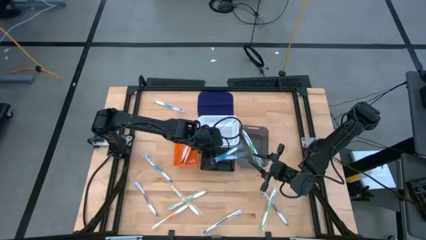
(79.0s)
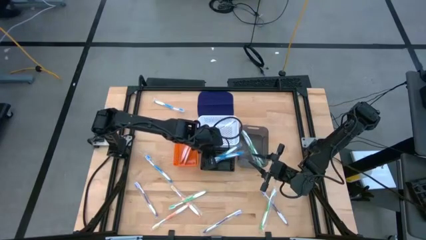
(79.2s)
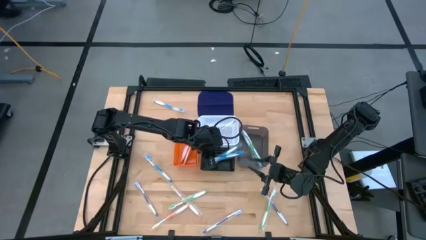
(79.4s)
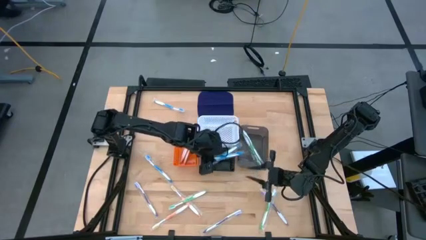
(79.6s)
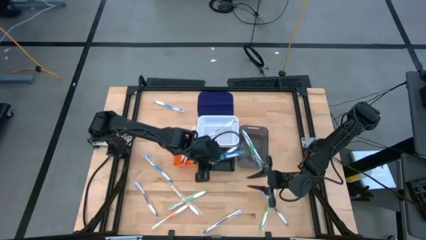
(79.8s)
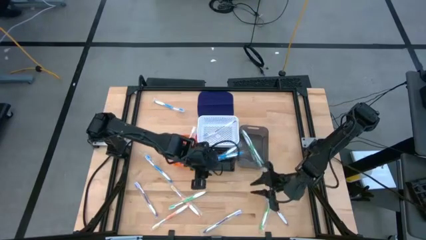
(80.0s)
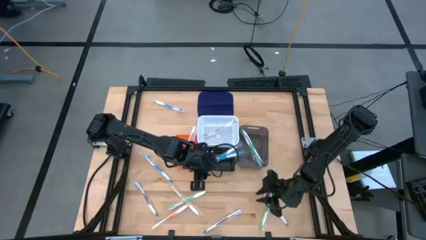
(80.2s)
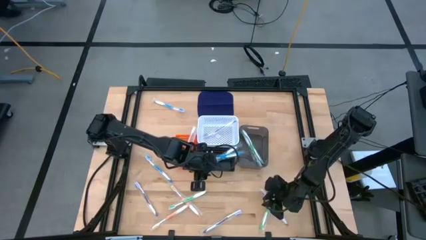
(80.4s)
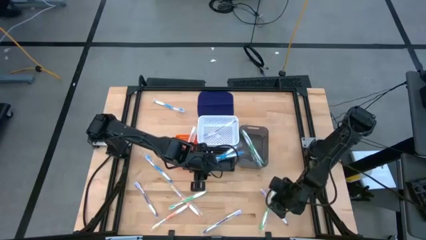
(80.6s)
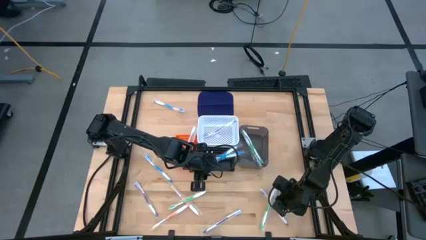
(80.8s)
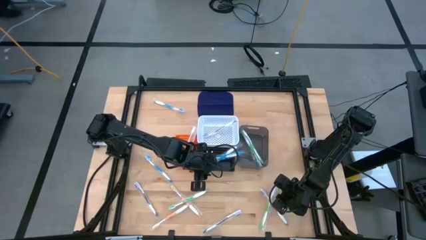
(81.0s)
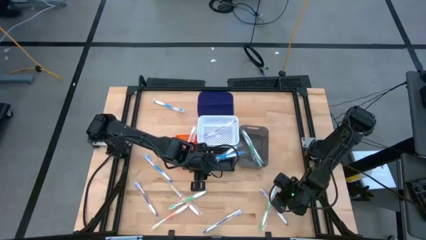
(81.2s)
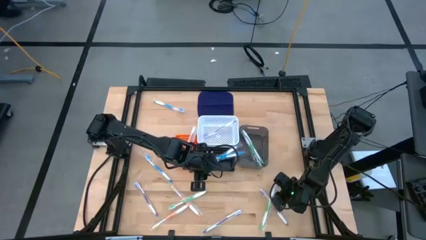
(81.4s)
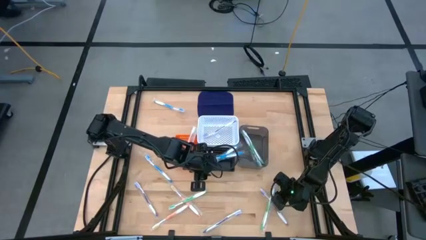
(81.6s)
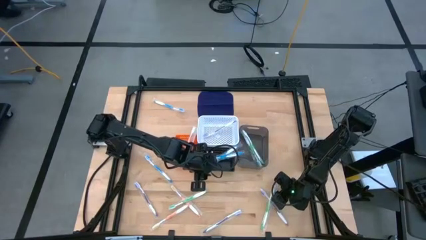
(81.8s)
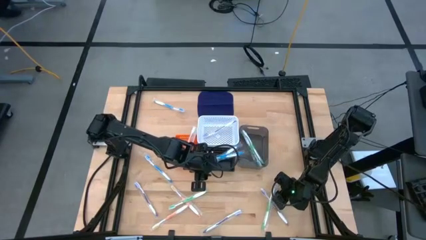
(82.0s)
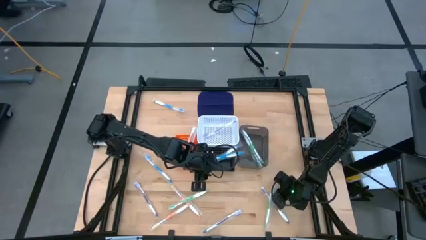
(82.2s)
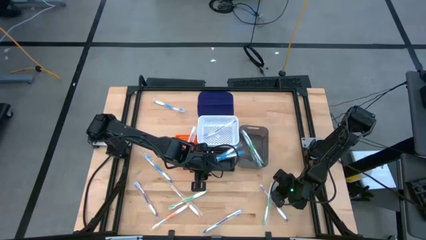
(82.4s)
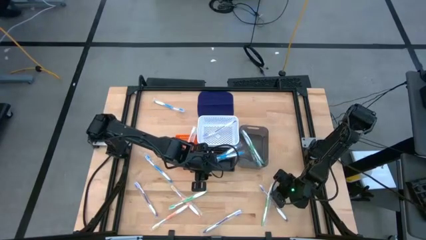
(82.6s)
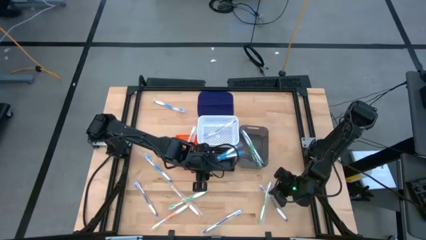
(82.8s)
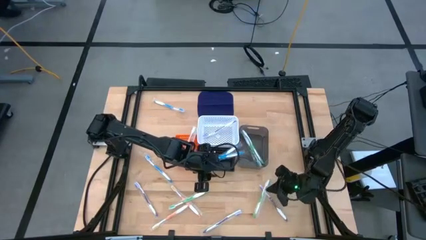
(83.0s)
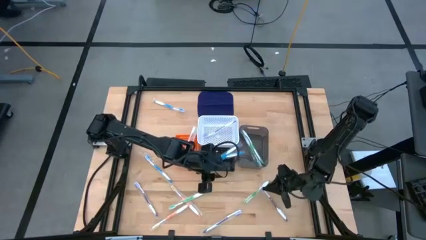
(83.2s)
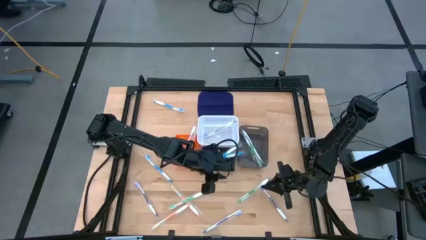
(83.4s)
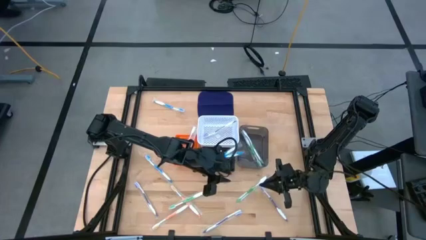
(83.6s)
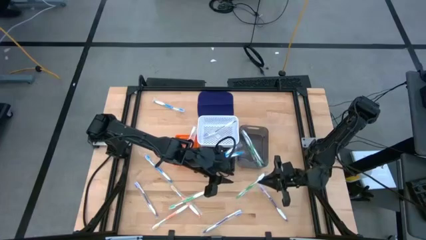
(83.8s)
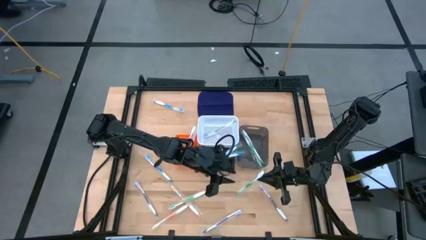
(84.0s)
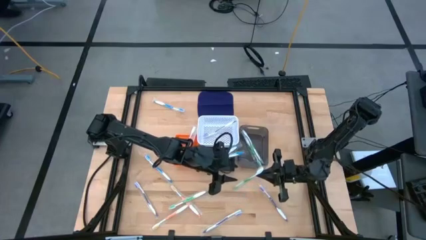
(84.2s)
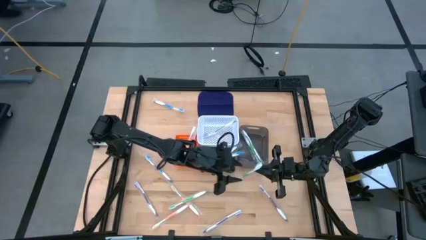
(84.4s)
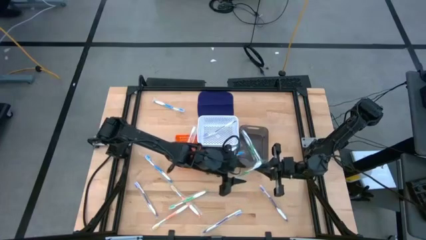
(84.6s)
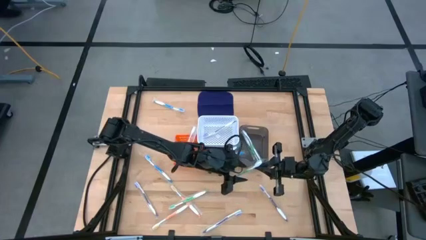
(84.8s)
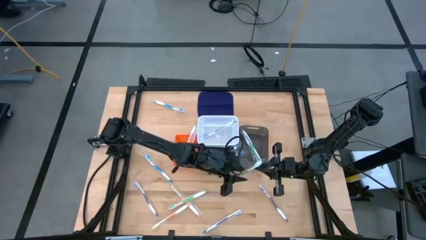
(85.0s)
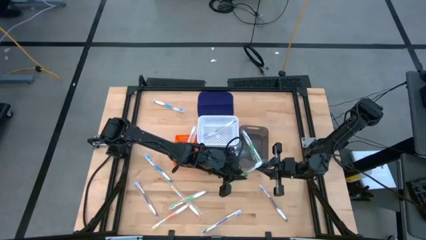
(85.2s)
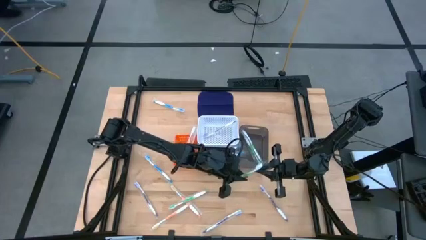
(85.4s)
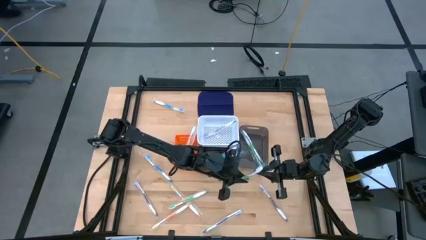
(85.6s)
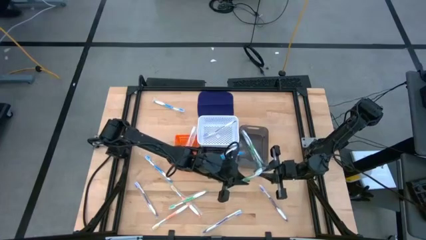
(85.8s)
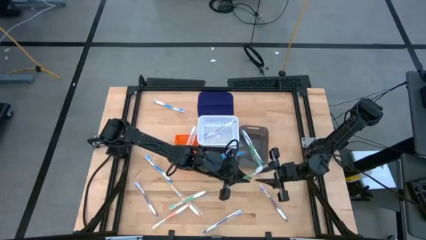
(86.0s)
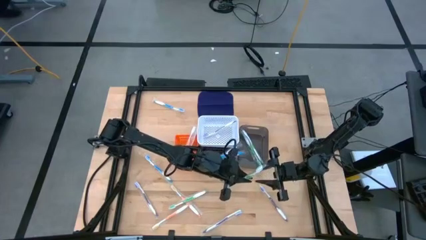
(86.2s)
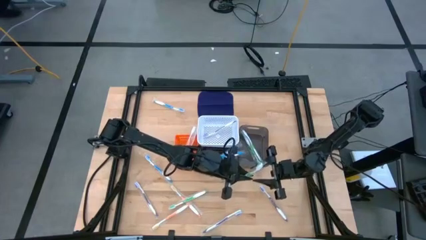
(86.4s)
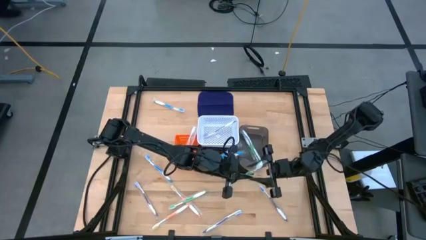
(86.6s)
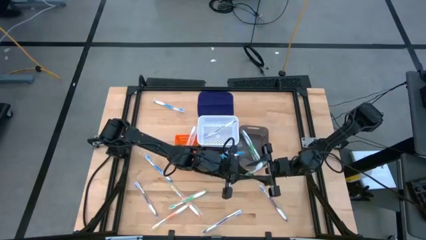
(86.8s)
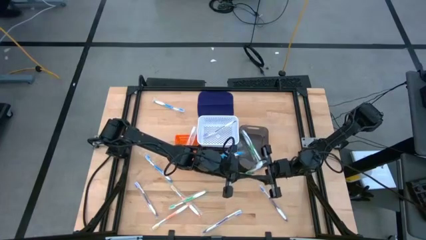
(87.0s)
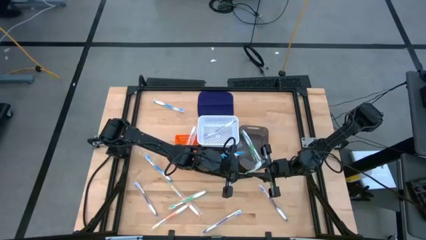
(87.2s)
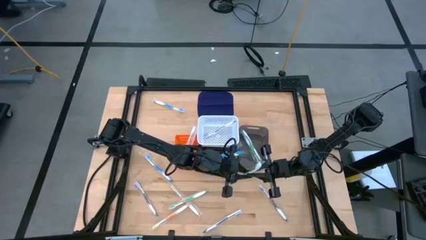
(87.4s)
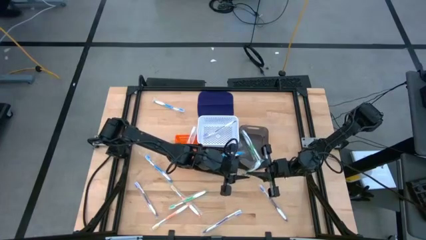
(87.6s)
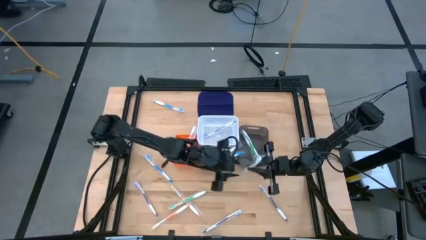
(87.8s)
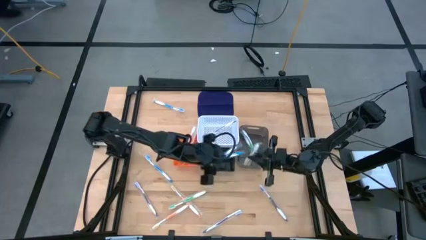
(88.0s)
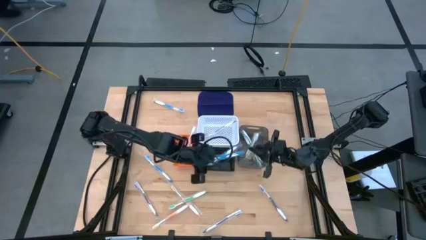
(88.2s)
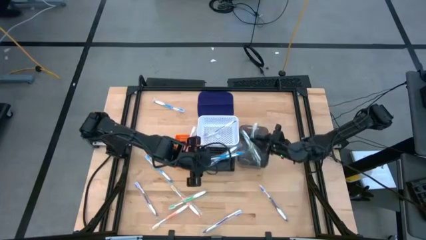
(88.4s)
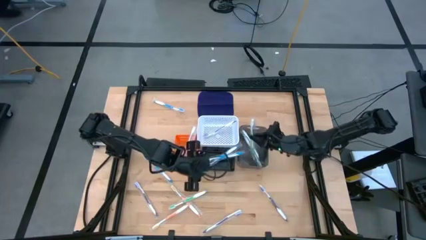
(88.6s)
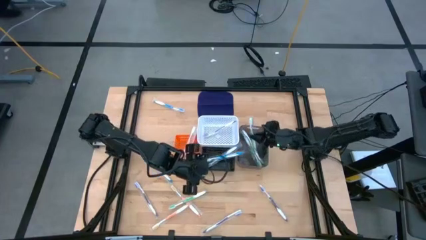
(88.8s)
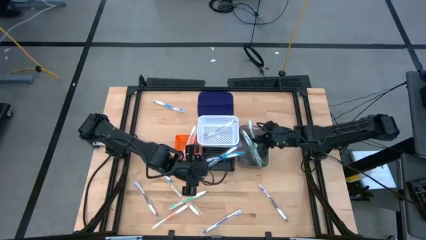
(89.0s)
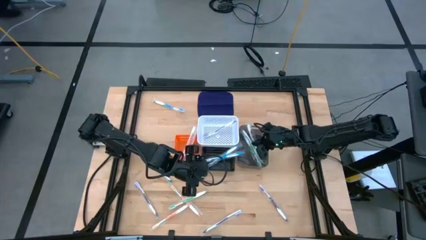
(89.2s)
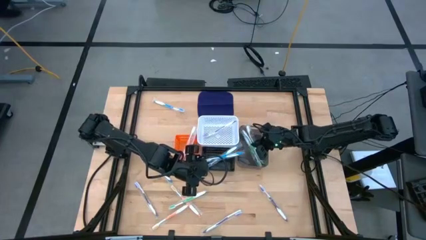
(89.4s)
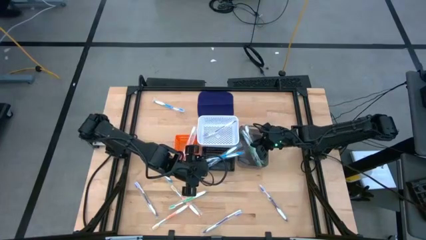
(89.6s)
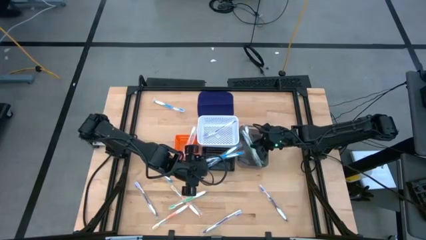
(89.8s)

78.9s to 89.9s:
Task: Pick & Place Toothbrushes
Put the green toothbrush into the black bin

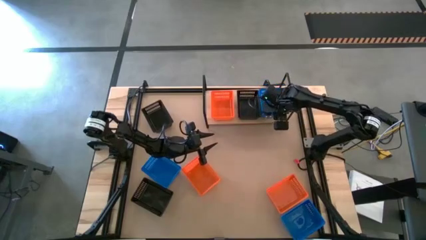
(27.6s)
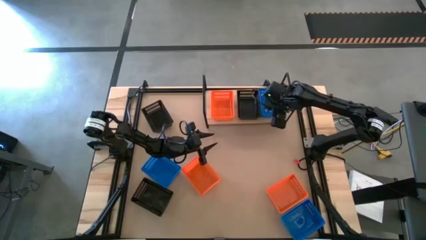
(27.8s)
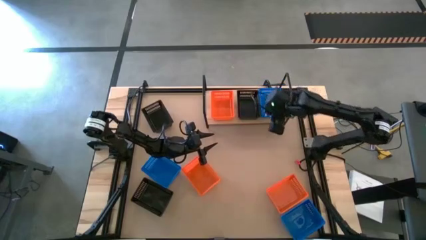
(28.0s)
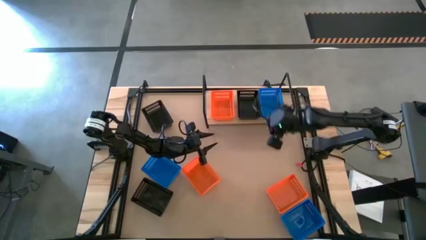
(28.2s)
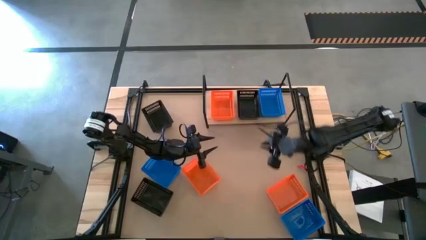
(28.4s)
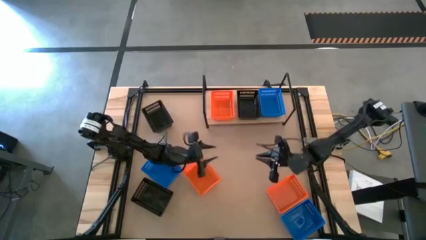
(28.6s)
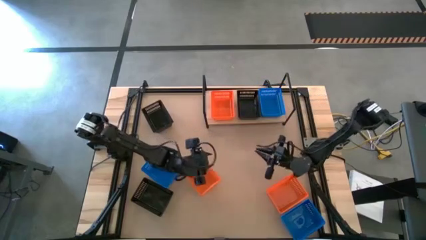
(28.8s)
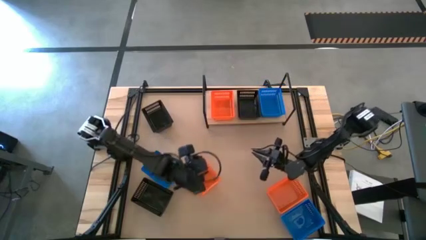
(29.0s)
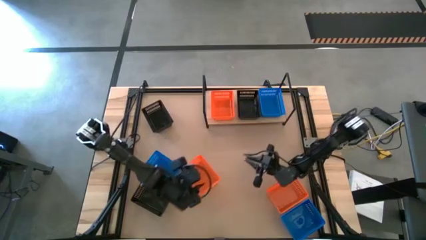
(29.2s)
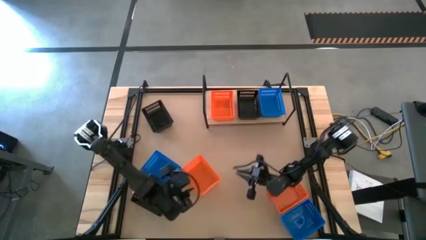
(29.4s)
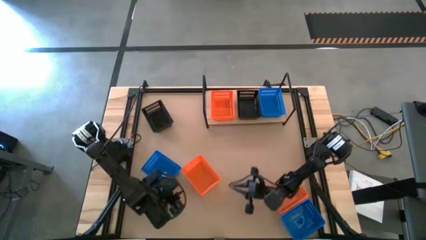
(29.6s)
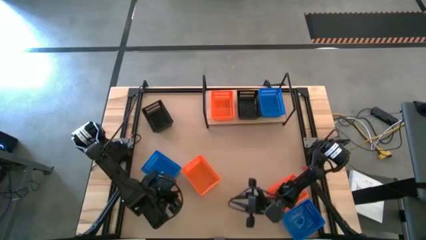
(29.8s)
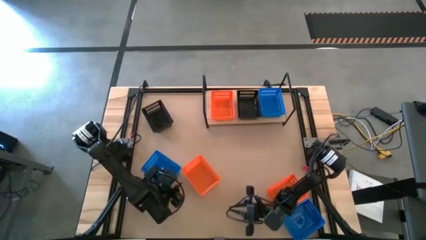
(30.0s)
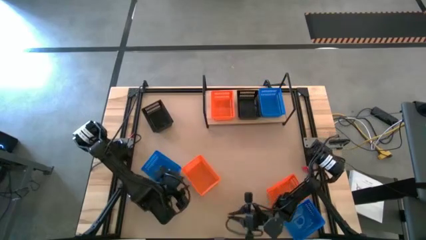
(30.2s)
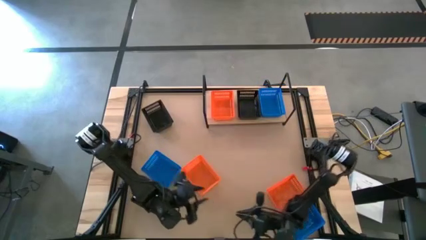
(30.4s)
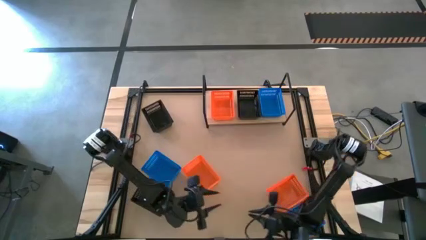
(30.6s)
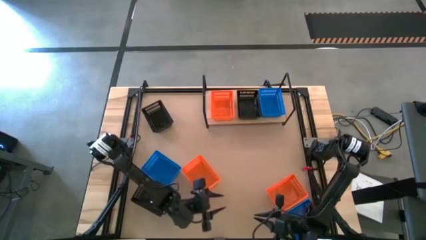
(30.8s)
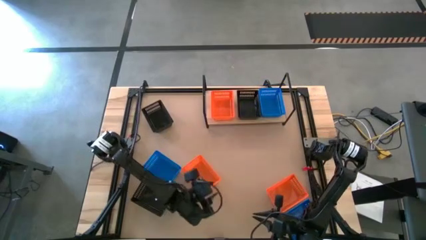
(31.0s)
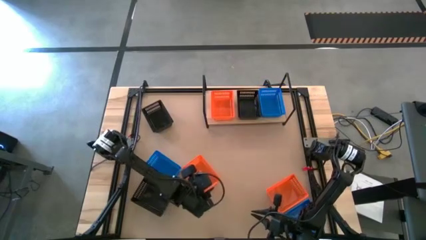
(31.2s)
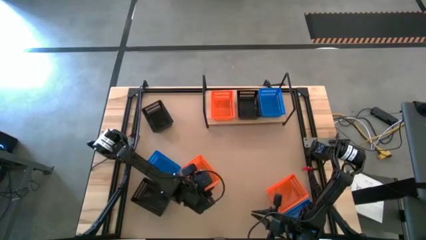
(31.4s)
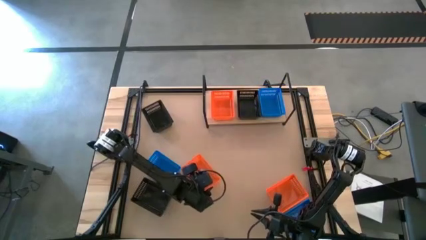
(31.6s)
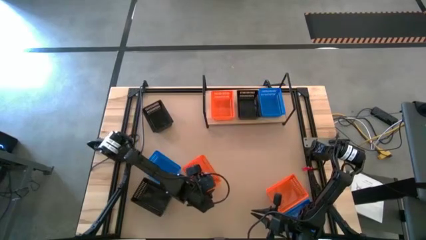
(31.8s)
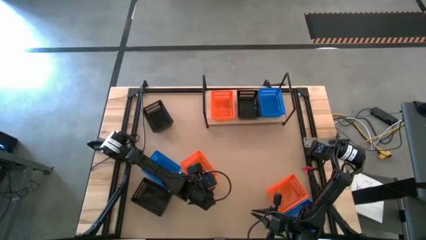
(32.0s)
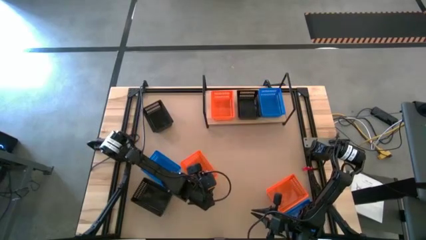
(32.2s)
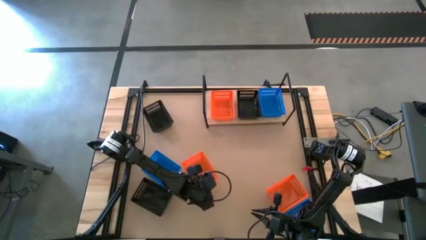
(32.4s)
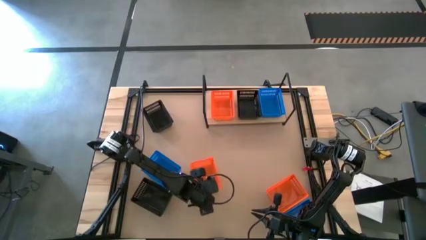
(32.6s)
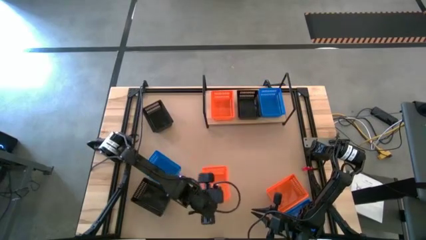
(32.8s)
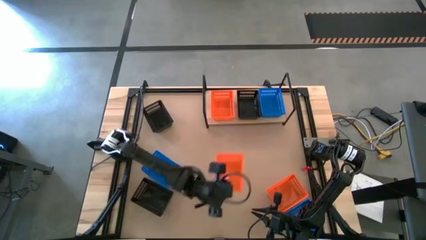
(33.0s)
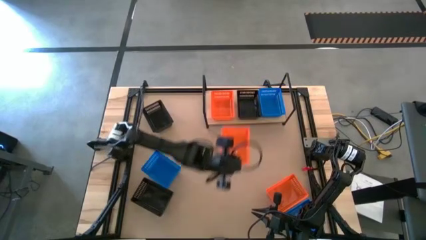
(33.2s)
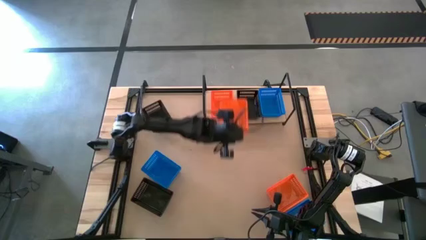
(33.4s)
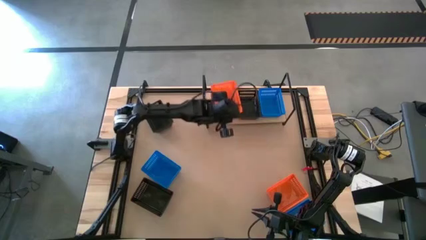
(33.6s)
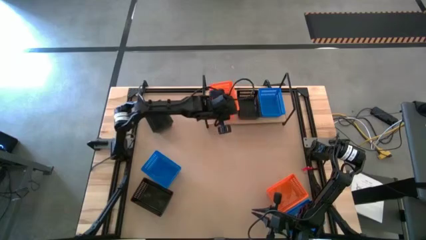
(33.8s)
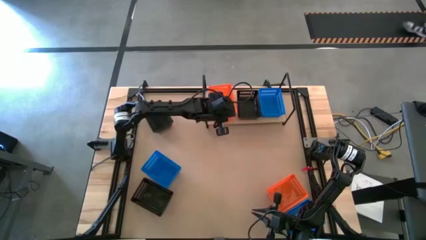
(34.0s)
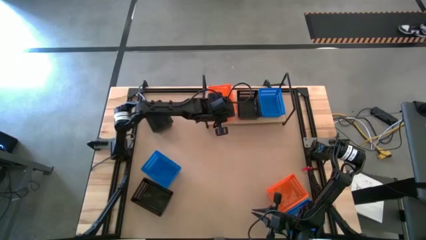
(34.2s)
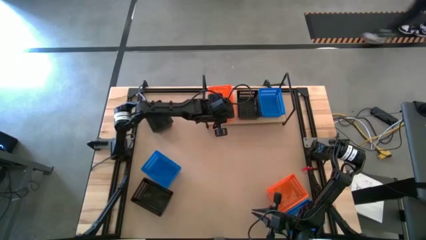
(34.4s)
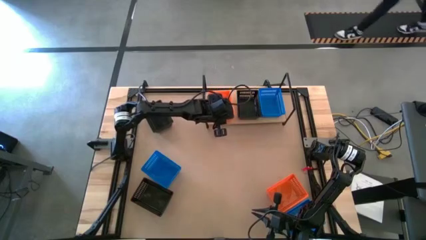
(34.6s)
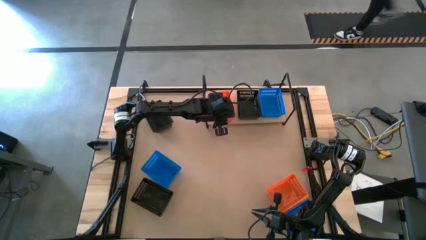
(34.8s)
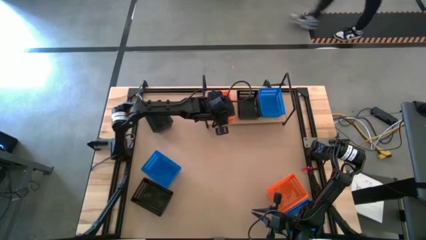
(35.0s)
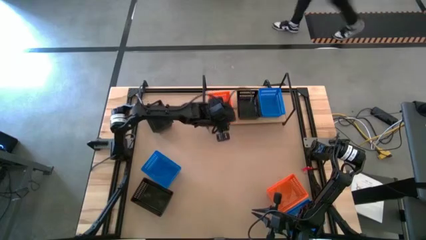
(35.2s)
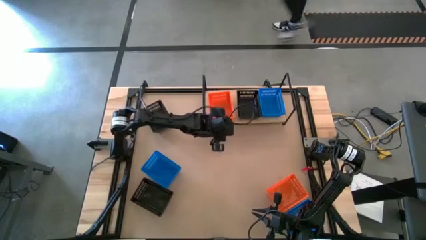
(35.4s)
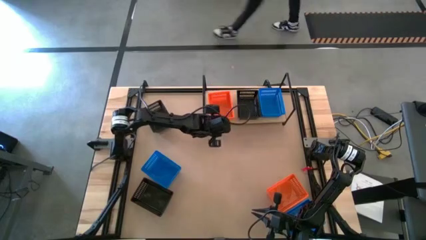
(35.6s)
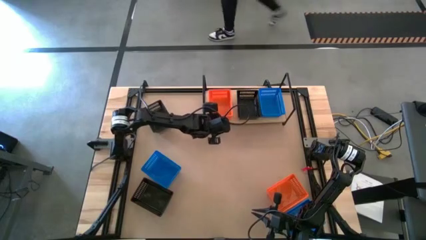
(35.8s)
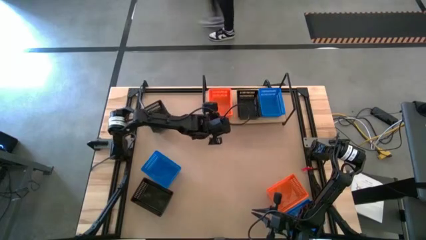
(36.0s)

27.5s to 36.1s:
Task: Stack baskets on shelf by color
Stack the left orange basket in the other orange basket on the shelf
